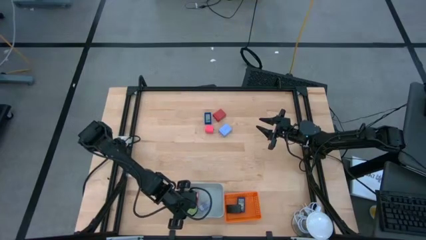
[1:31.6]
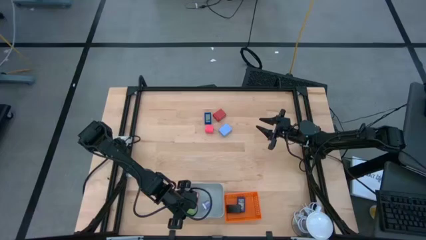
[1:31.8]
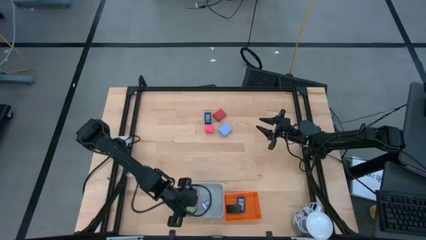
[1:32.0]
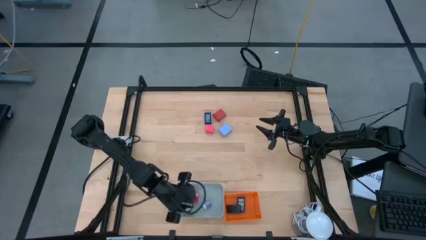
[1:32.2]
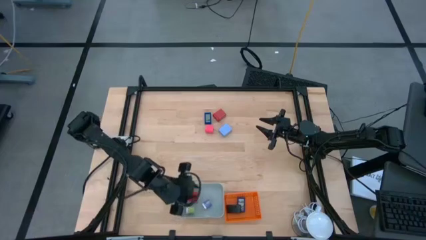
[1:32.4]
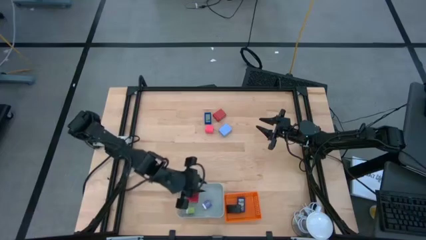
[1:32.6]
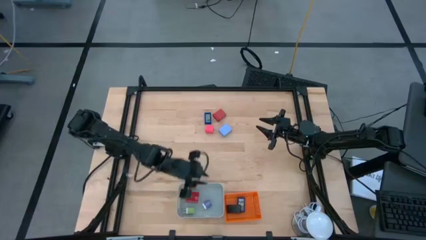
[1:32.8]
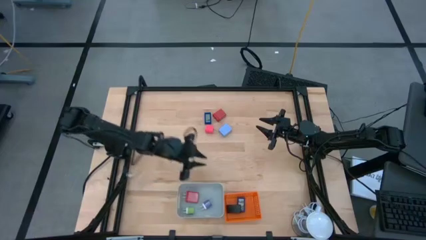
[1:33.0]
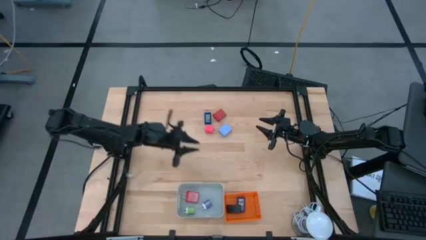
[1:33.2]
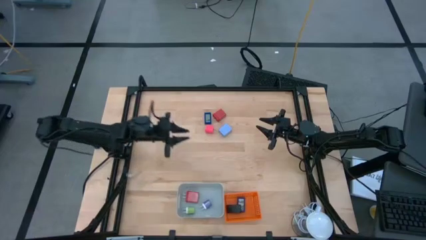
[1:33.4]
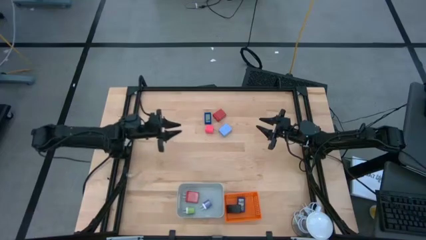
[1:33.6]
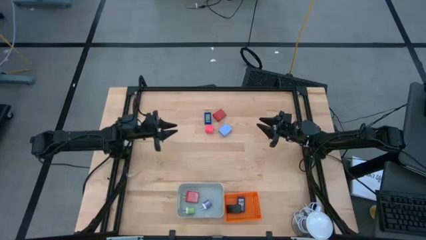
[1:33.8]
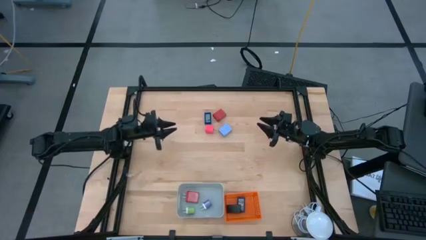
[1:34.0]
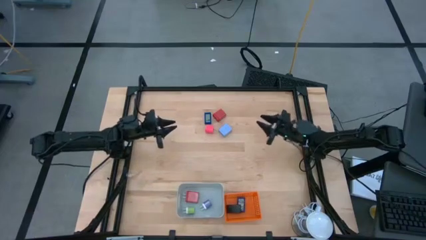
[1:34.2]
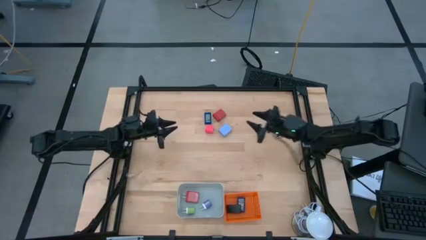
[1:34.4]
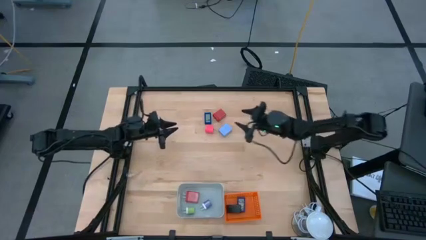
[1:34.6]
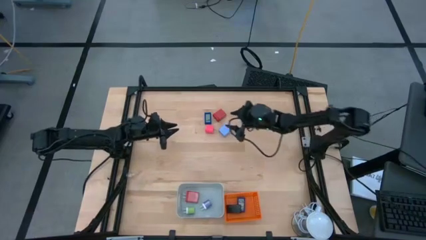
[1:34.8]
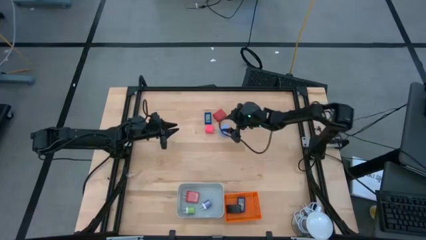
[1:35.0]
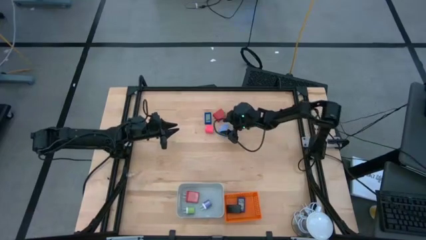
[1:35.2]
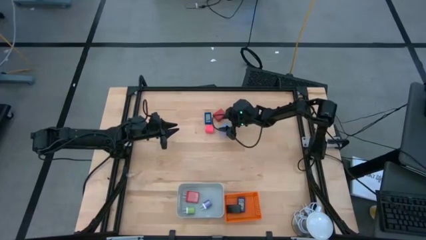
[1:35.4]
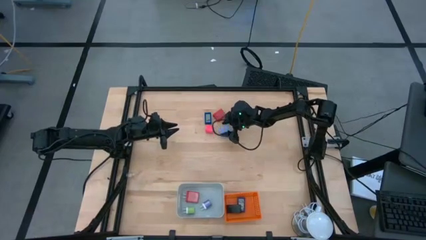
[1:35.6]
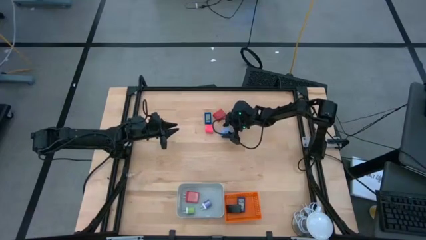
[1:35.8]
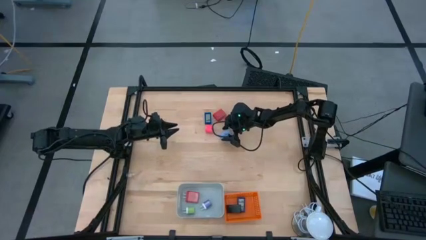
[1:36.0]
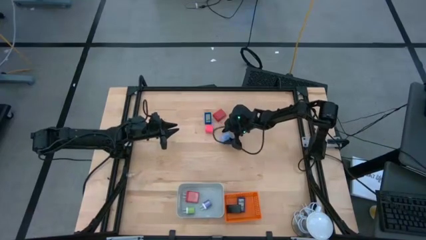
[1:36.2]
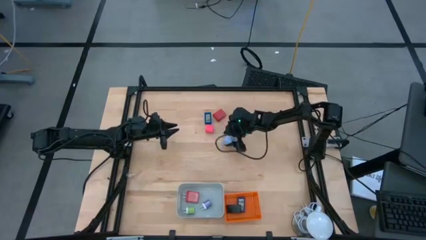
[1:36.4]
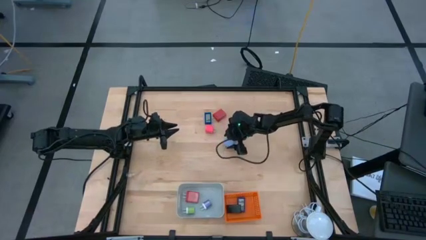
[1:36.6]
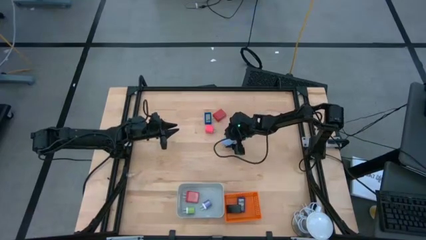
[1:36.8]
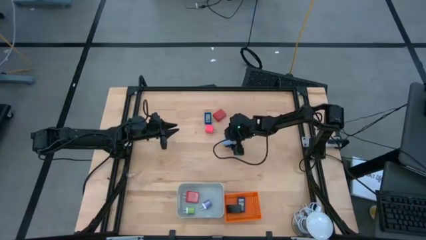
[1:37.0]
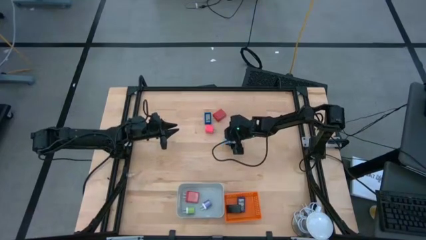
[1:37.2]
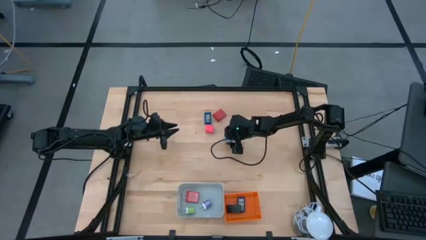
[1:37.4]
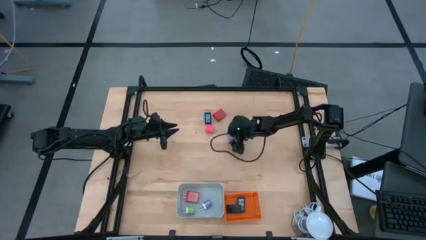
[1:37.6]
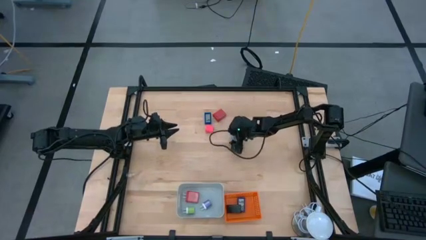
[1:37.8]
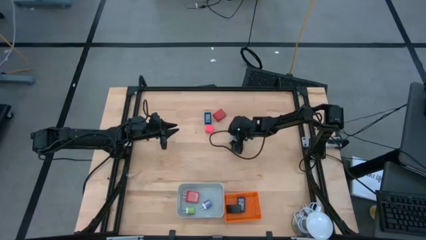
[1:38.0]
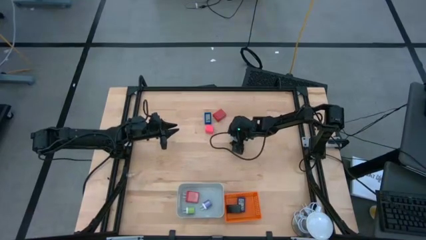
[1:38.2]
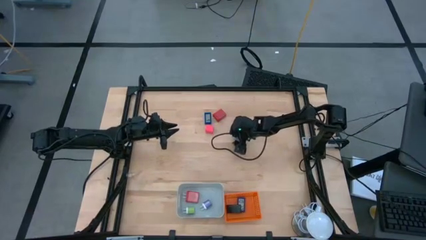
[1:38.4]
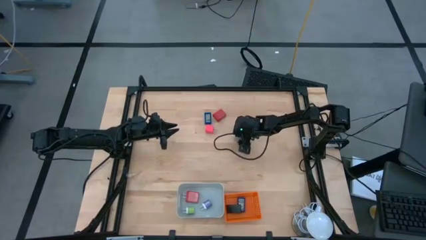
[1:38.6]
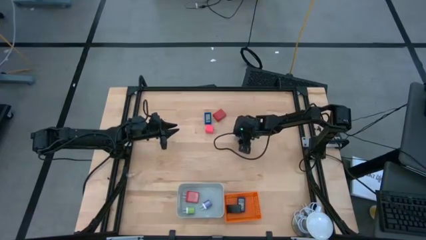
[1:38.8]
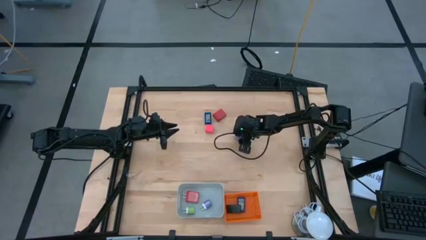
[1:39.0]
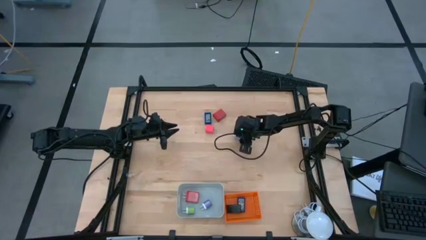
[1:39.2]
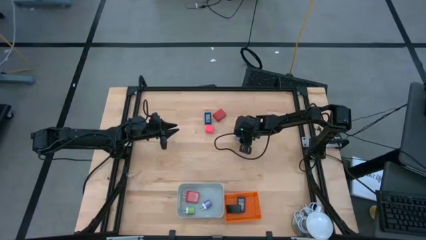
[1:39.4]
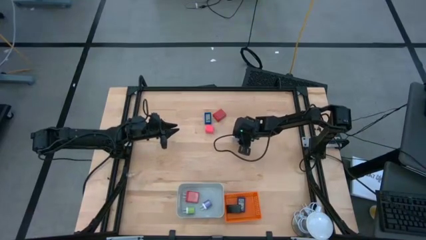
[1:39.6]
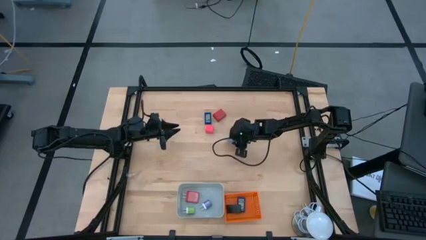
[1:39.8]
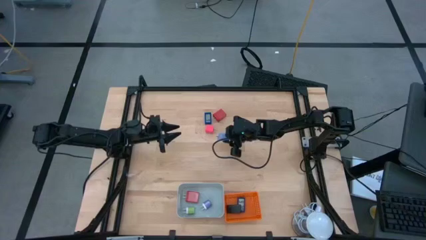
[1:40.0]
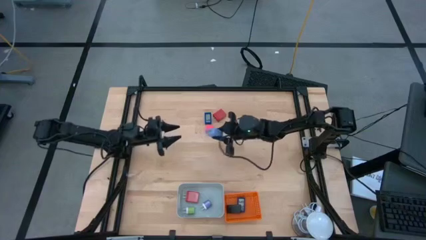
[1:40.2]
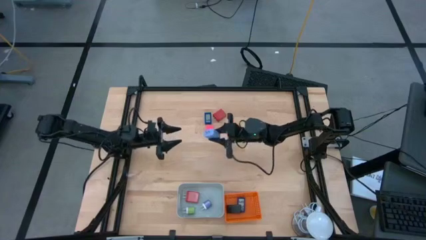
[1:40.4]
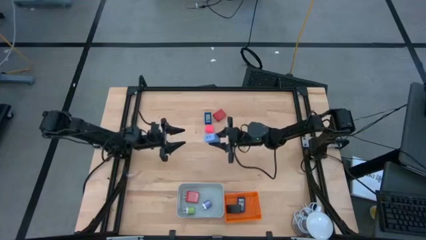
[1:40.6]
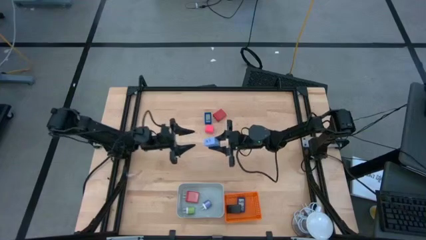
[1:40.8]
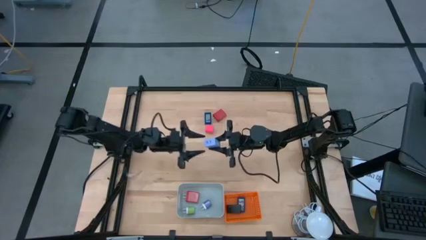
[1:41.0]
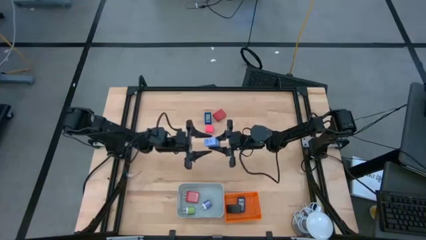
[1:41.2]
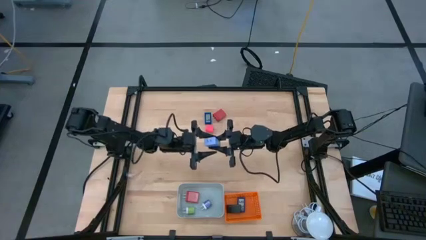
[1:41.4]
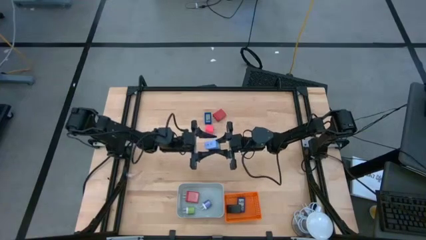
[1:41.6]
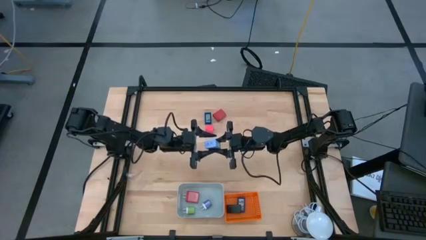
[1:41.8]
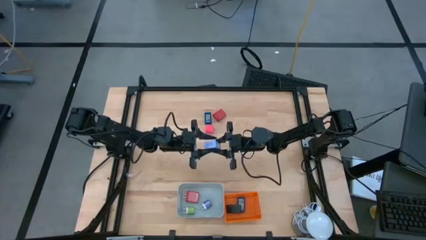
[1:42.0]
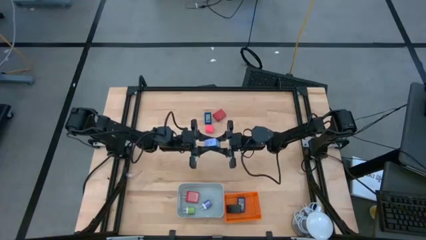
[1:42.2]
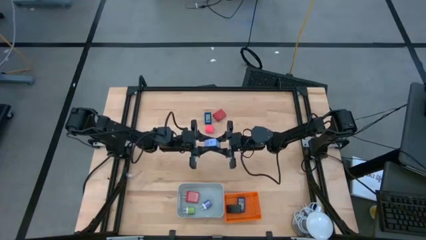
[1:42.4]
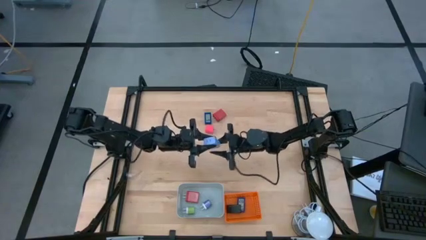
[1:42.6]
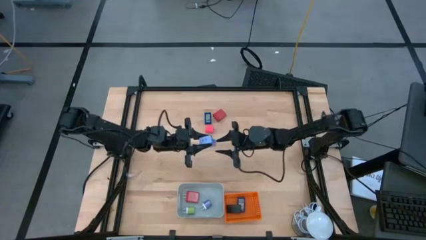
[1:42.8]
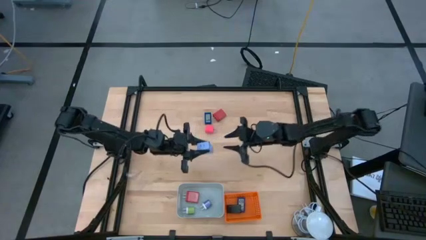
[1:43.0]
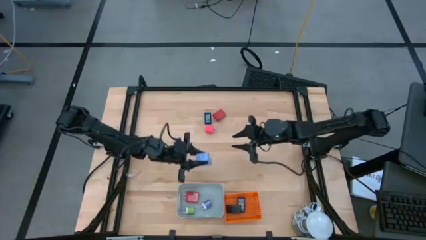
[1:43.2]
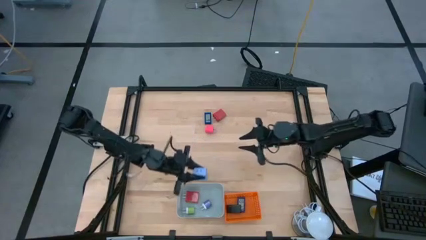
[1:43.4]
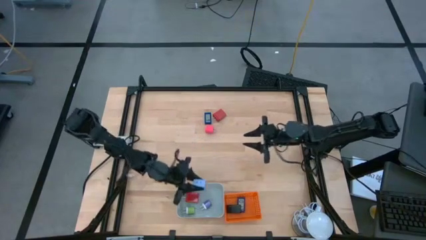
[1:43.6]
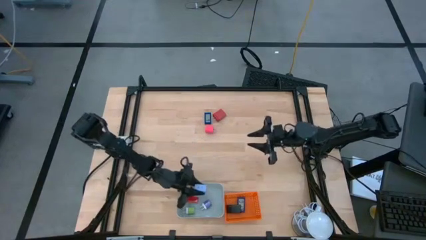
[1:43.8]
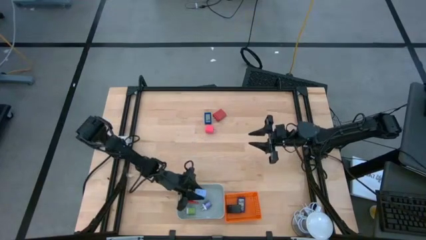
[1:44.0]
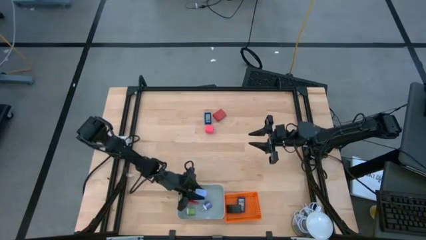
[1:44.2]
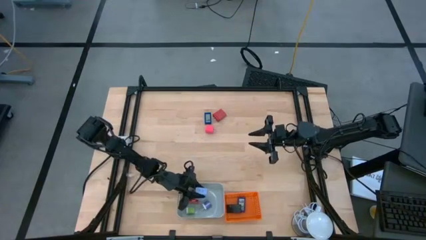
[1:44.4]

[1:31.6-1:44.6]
Task: Pick & Place Office items
Put the light blue charger adapter into the gray bin

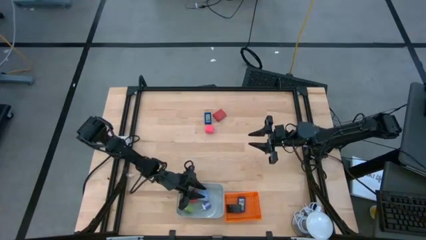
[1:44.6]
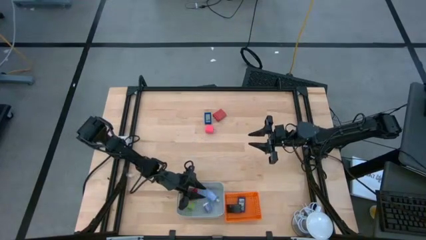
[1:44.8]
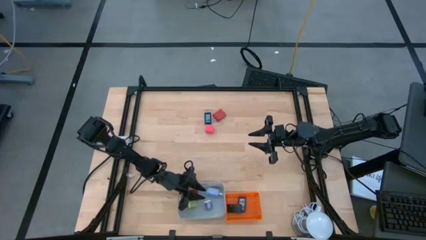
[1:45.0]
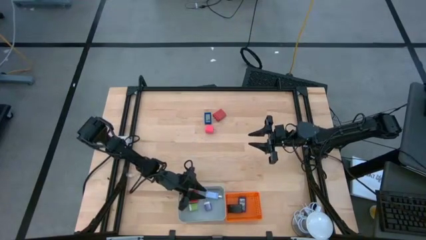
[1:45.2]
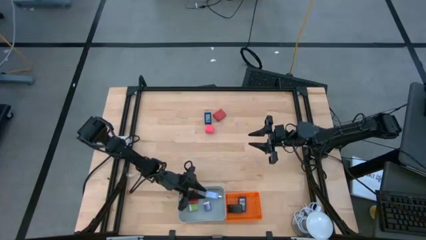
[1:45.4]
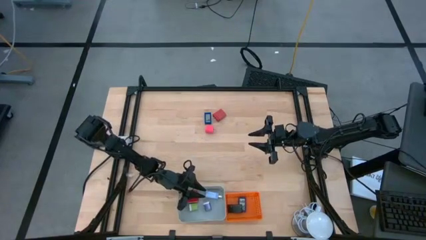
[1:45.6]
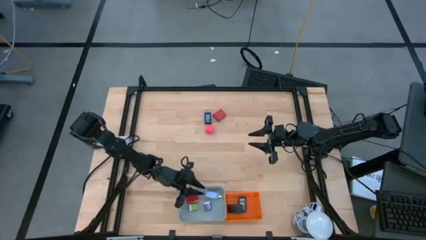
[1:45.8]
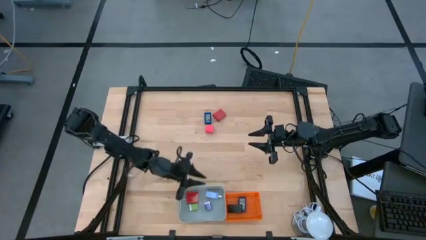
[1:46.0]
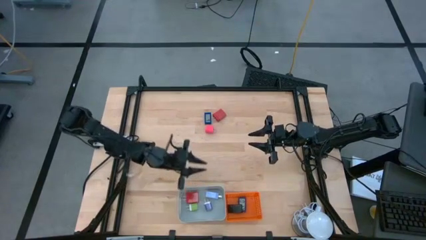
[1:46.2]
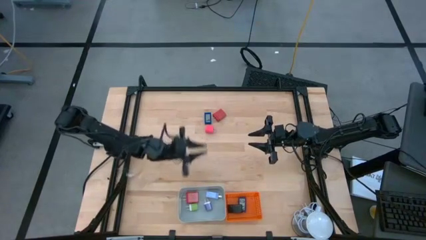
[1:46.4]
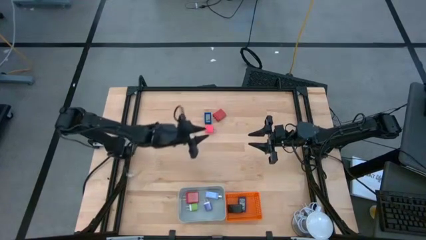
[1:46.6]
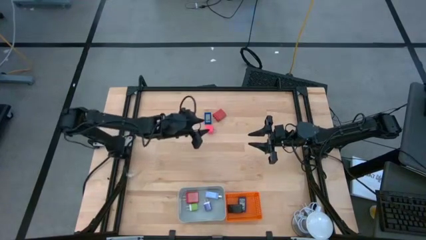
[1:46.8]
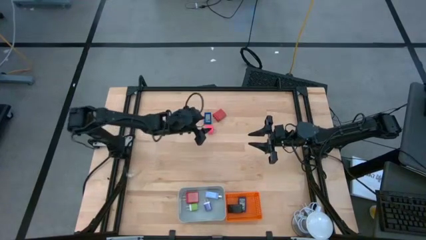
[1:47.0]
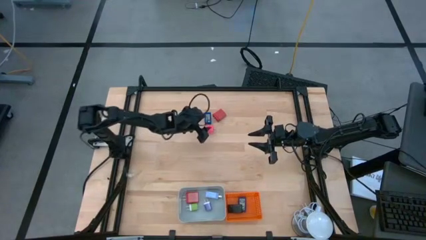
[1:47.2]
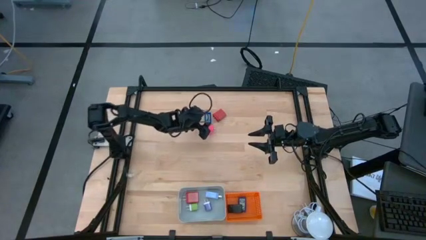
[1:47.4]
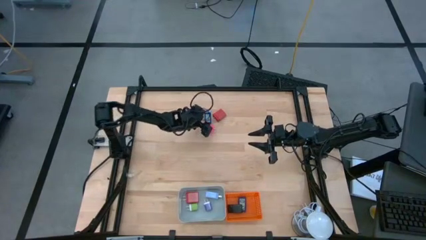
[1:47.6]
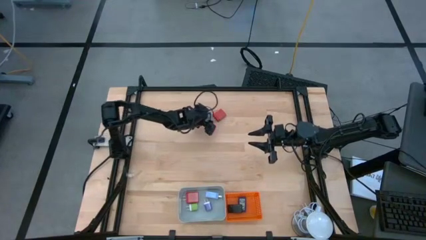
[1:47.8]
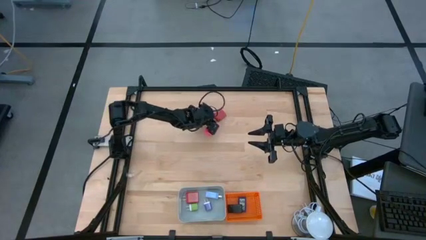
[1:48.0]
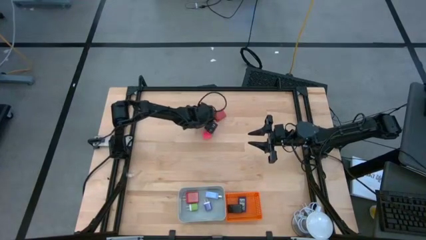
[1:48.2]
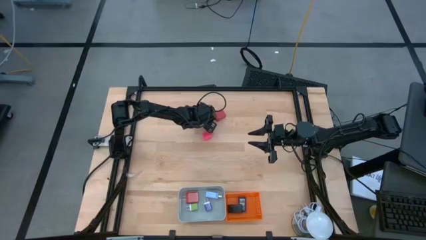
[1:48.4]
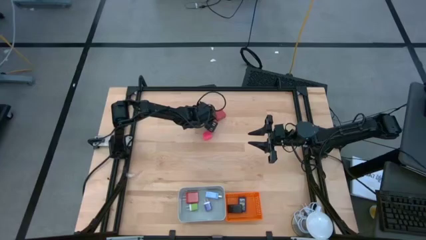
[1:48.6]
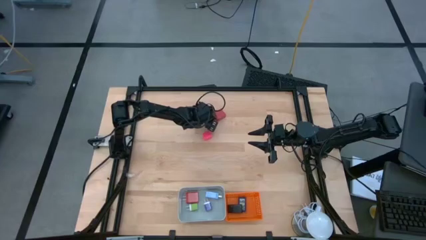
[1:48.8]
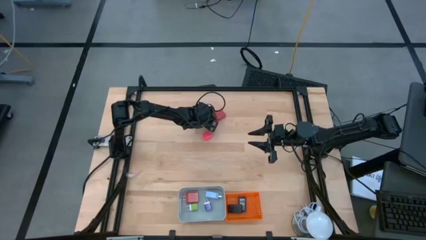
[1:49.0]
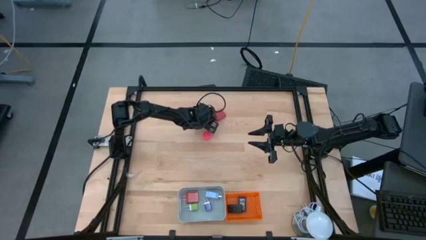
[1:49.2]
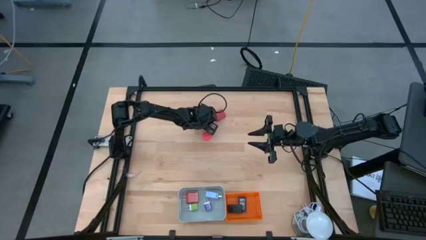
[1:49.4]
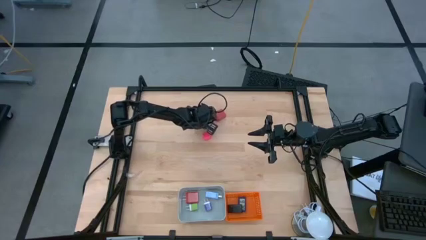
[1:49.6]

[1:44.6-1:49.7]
Put the blue digital timer into the orange bin
